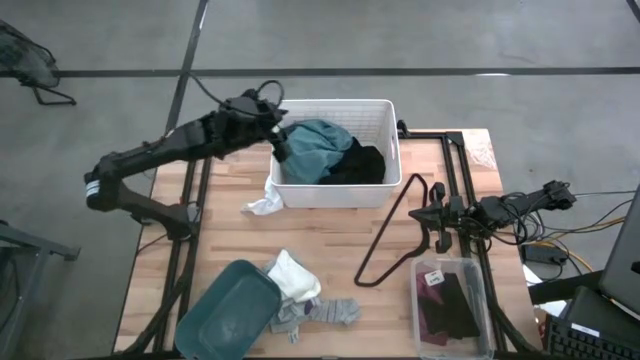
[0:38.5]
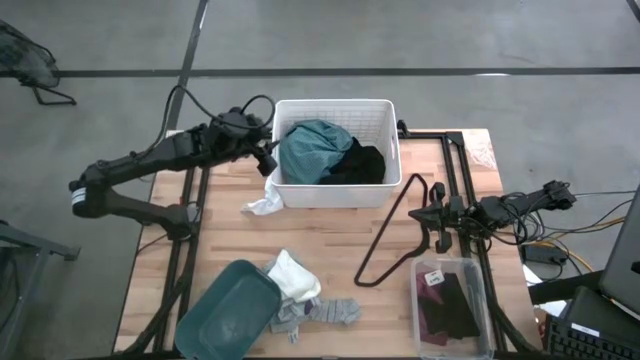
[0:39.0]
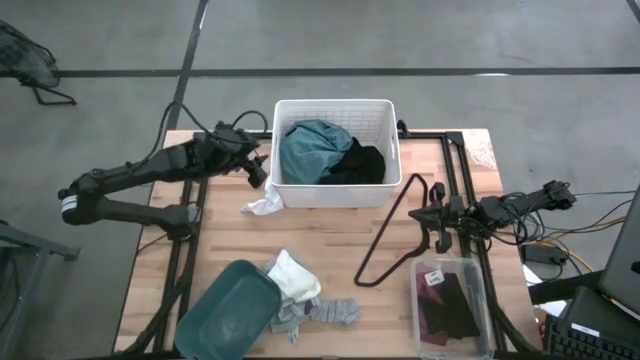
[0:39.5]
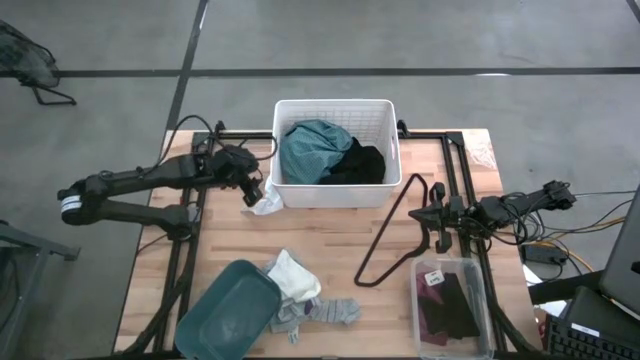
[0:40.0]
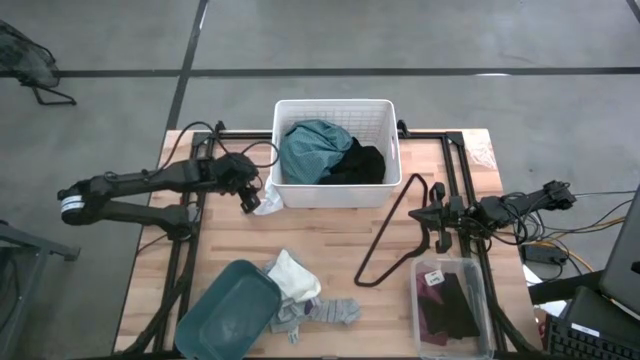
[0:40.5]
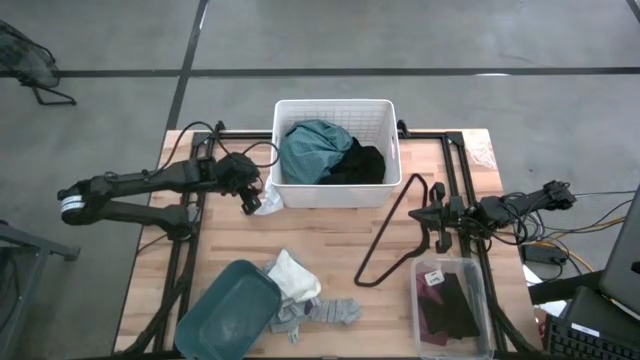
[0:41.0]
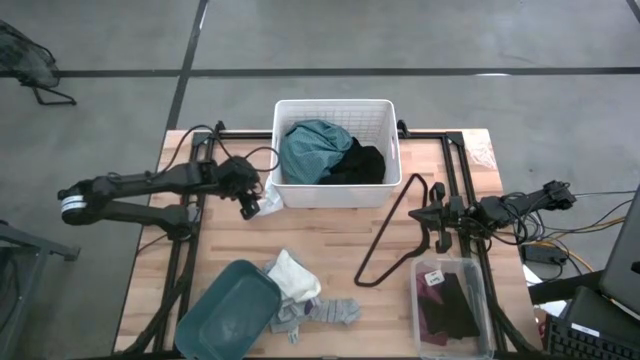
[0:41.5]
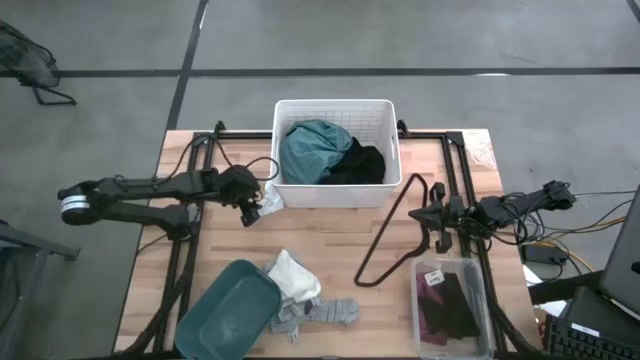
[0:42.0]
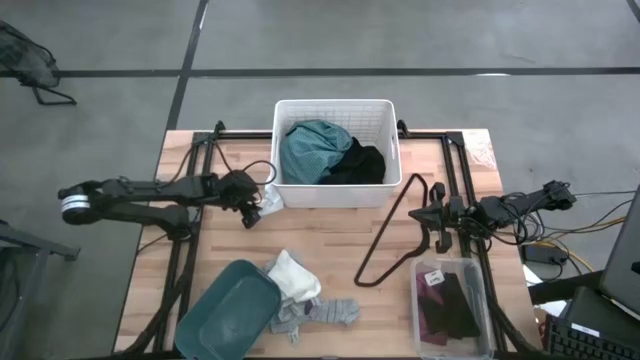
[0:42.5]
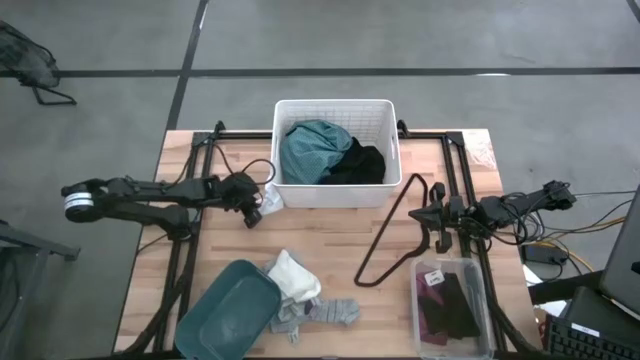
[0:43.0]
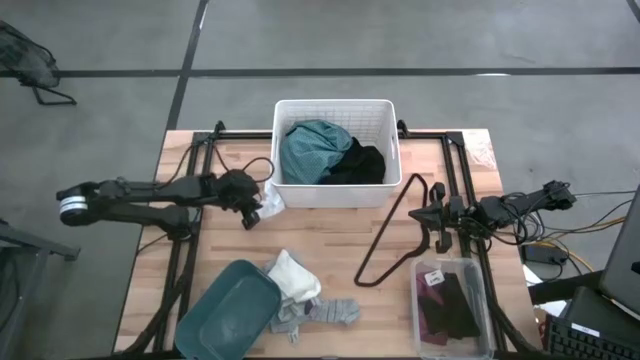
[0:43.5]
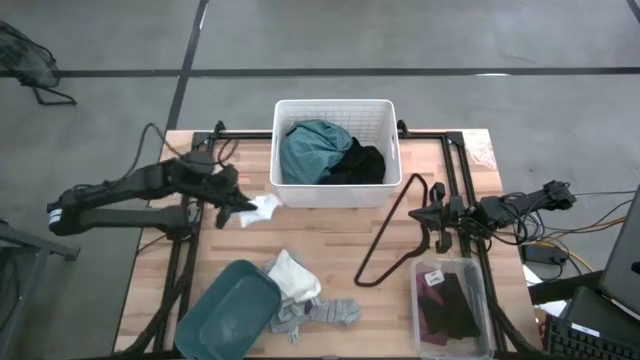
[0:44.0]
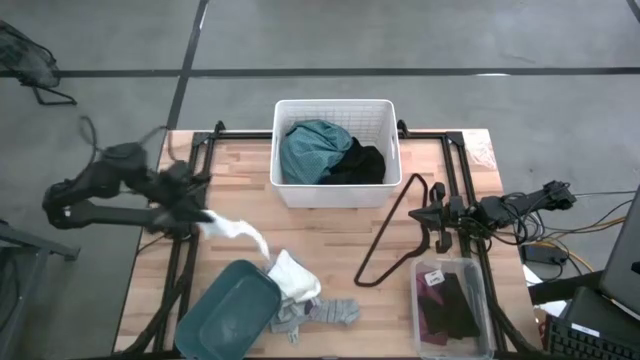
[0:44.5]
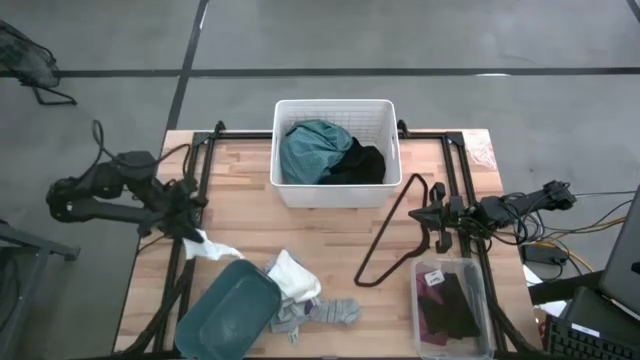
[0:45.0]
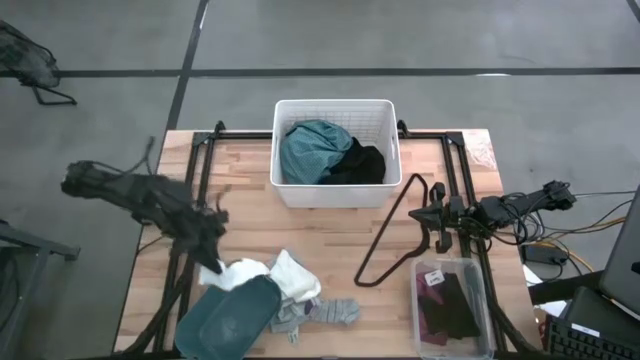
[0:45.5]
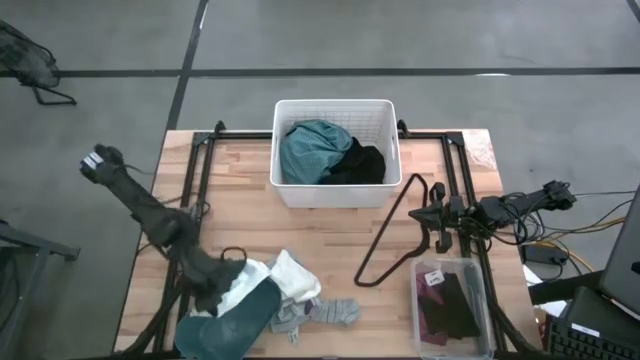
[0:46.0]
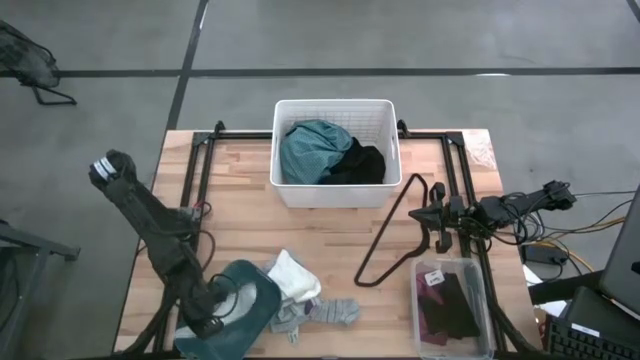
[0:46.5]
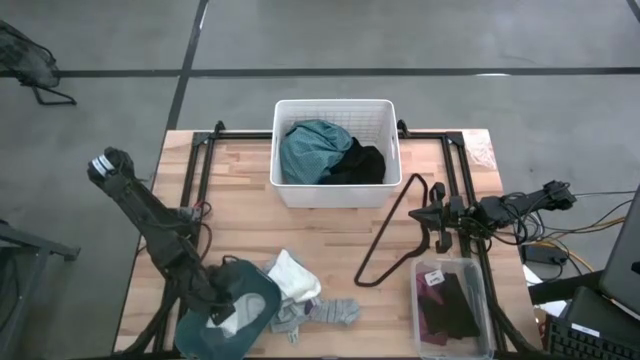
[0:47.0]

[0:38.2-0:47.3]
Task: Pick & Place Cloths
Put the top white sock into the green bin

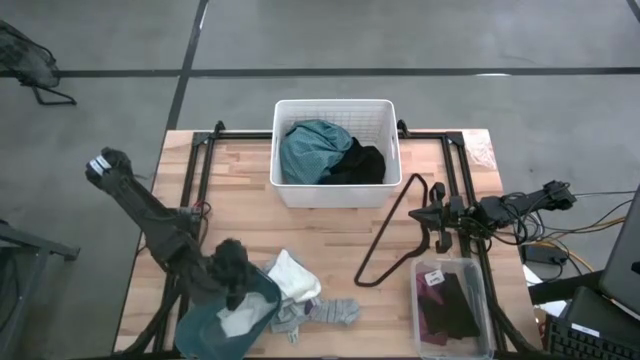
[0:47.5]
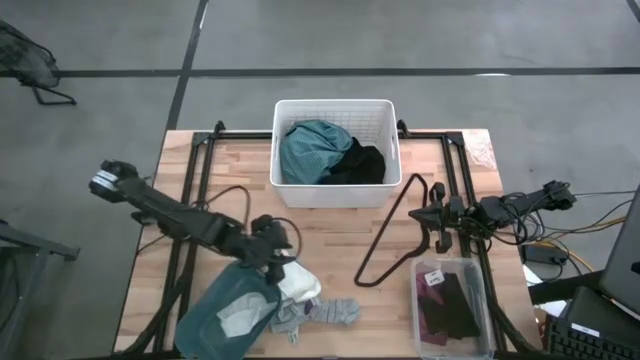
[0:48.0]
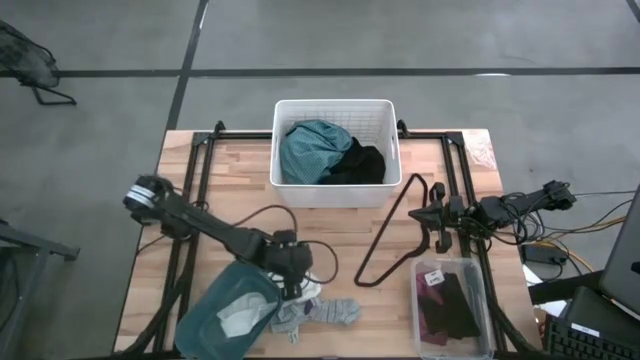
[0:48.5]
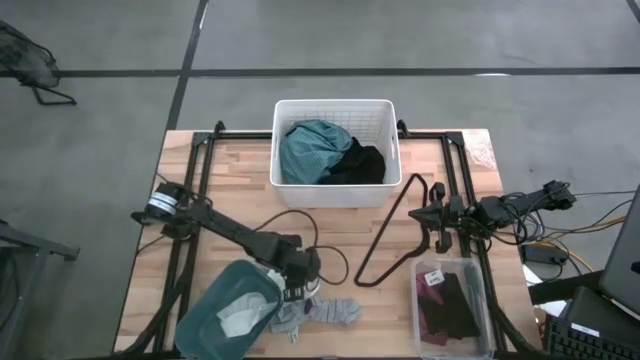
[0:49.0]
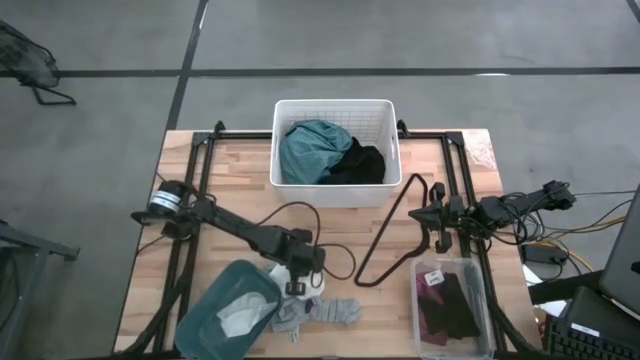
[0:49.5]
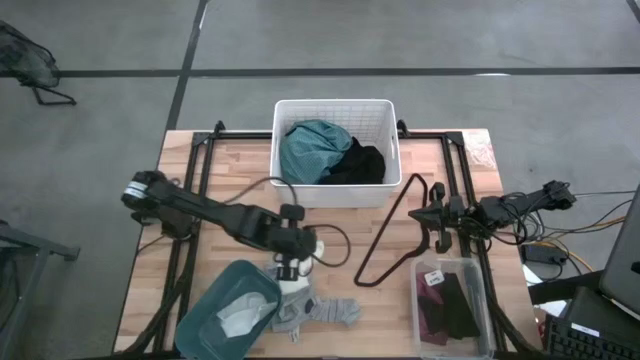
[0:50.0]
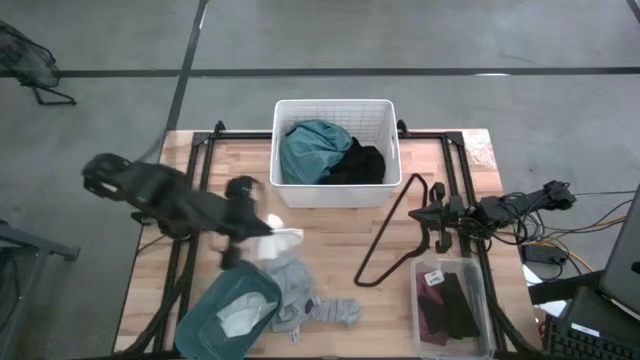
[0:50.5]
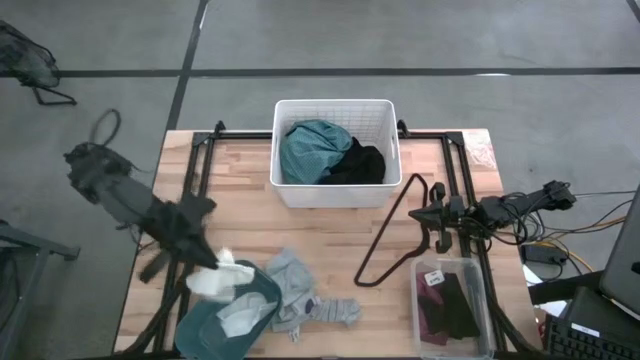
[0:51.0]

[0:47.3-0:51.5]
Put the white sock into the green bin

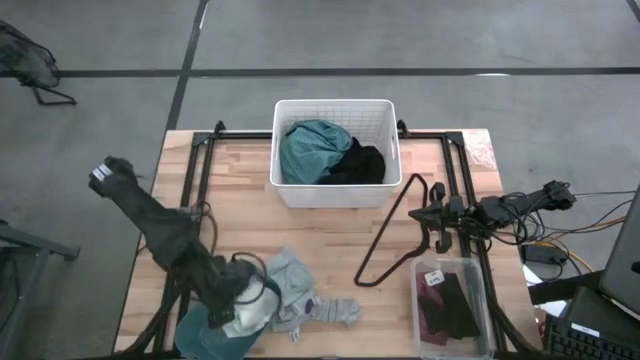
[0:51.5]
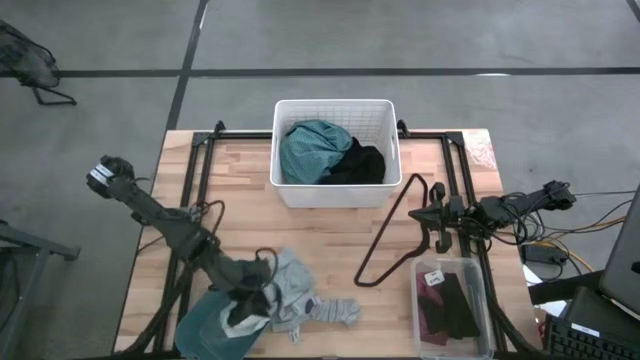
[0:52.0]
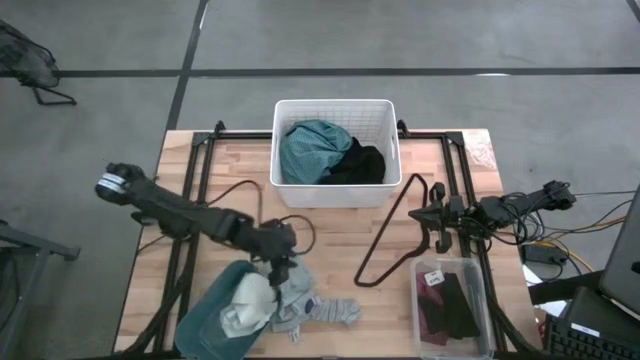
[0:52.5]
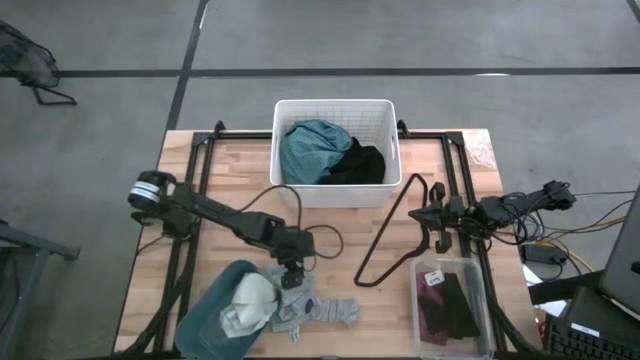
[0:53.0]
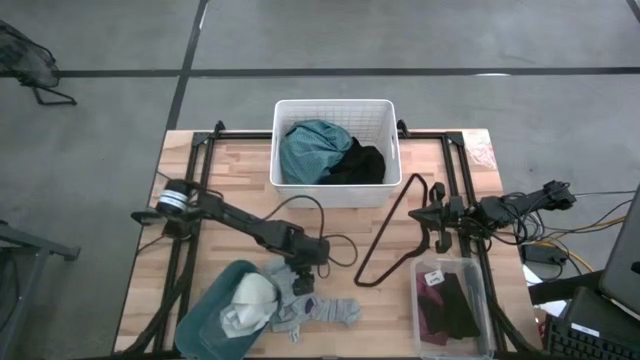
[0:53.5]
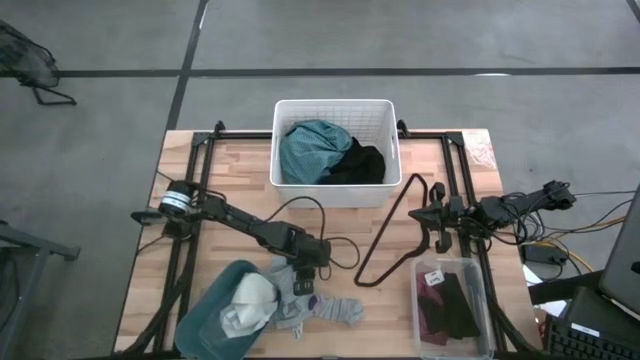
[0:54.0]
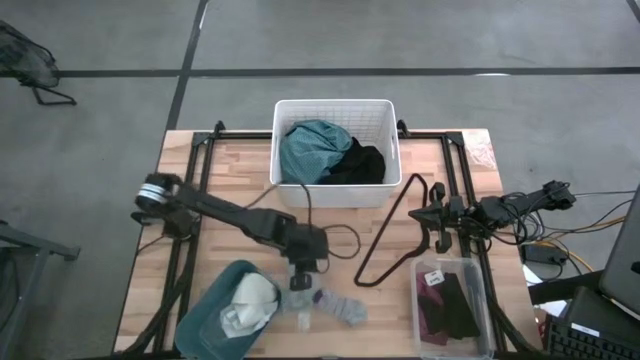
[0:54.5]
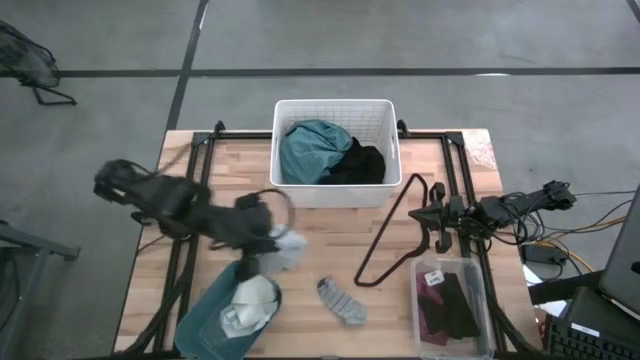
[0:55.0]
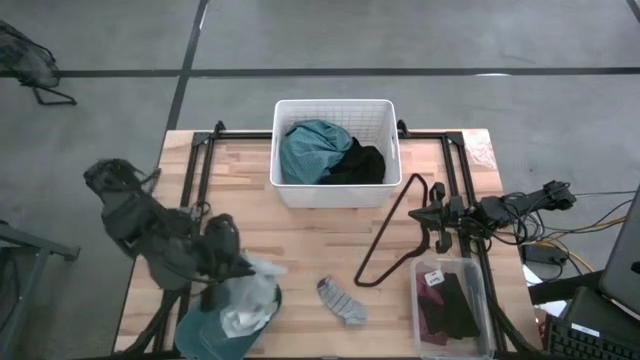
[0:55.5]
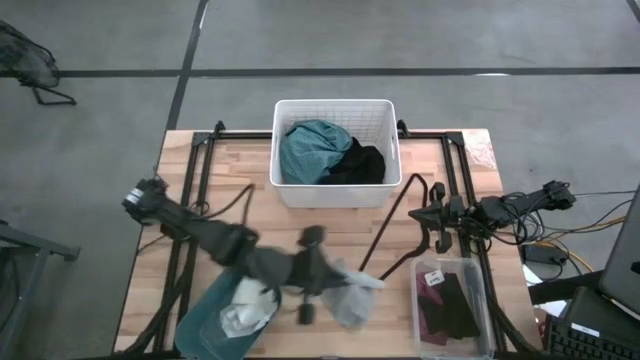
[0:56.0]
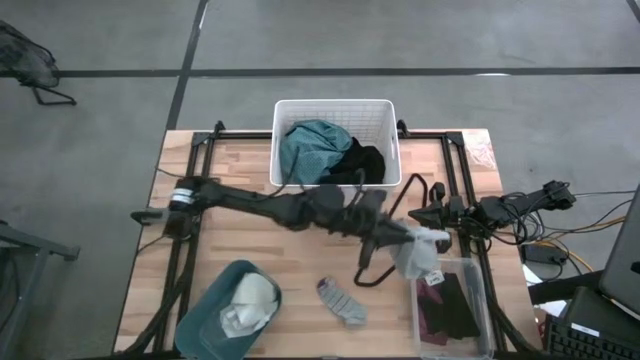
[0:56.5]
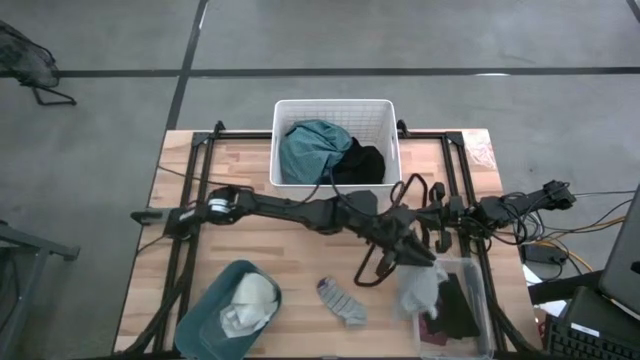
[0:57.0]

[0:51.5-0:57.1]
Put the gray underwear into the transparent bin

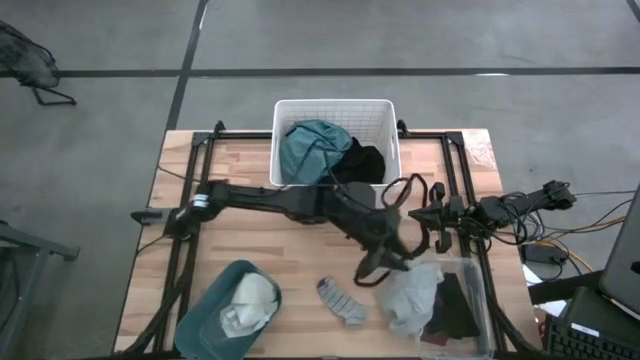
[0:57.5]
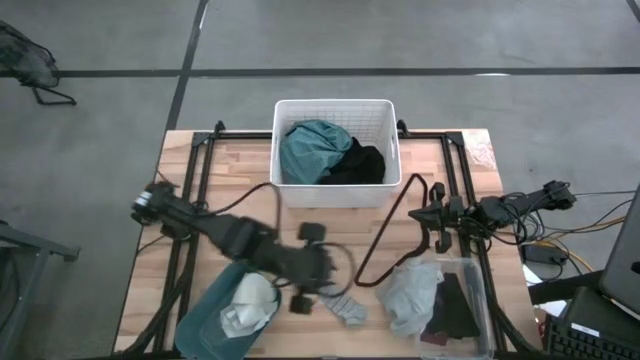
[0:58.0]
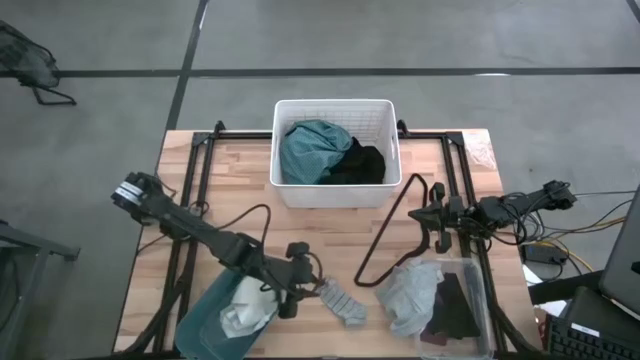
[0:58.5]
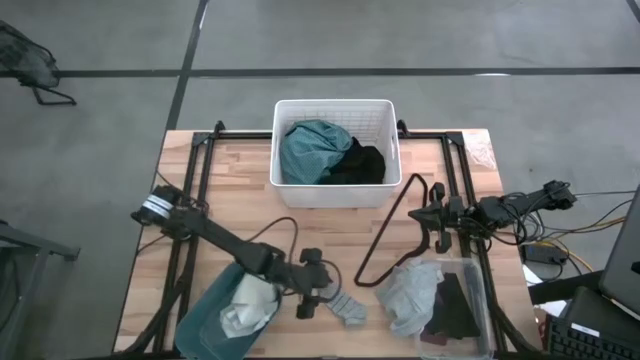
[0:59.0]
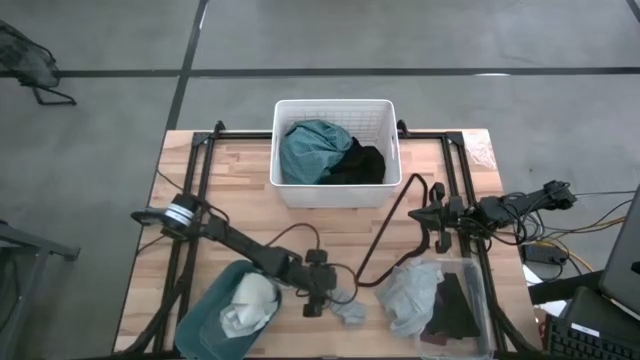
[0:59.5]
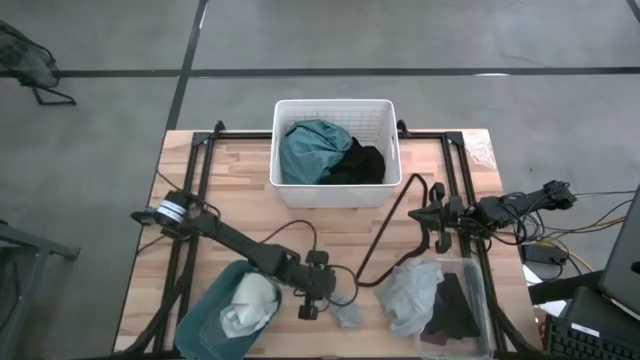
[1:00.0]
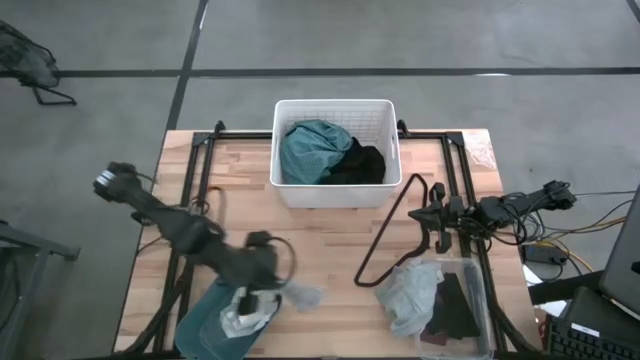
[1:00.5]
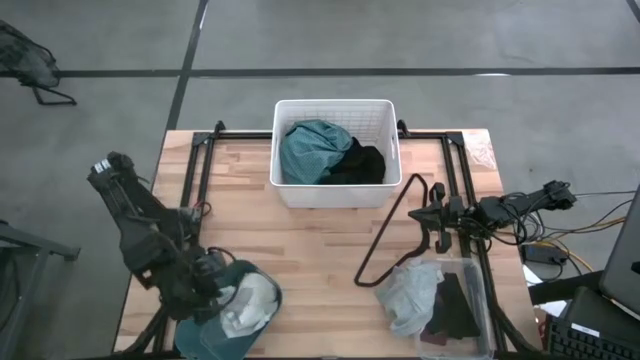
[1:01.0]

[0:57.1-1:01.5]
Put the patterned sock into the green bin
